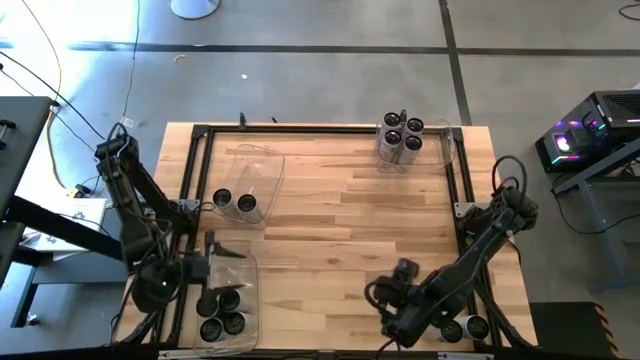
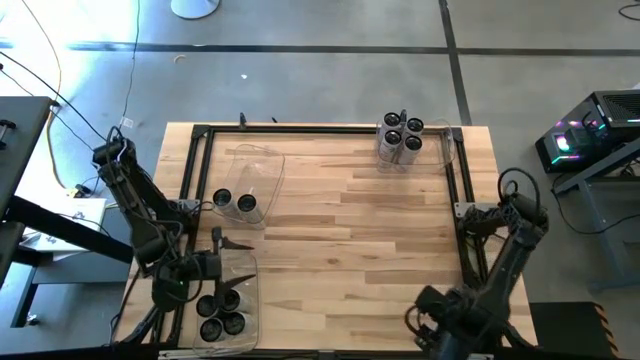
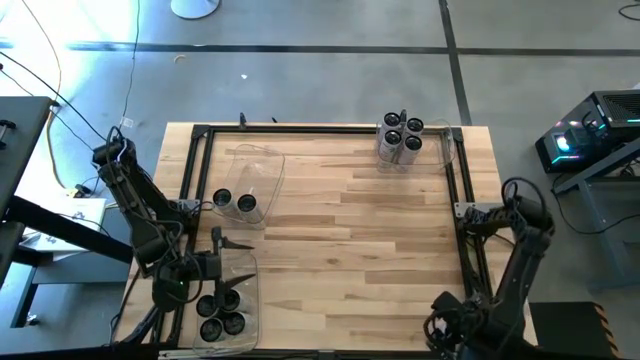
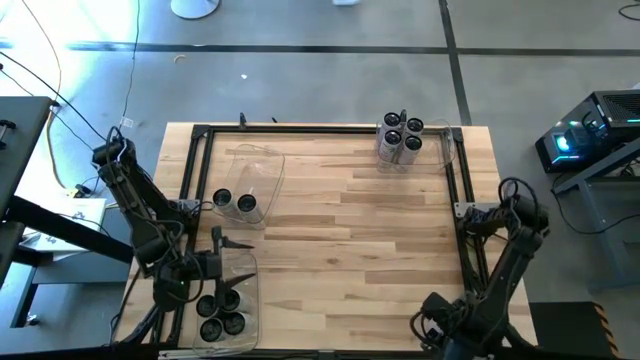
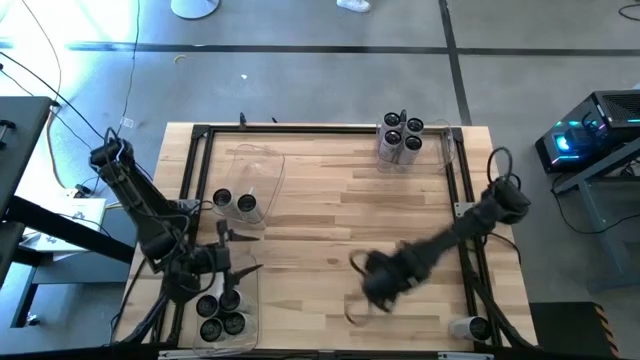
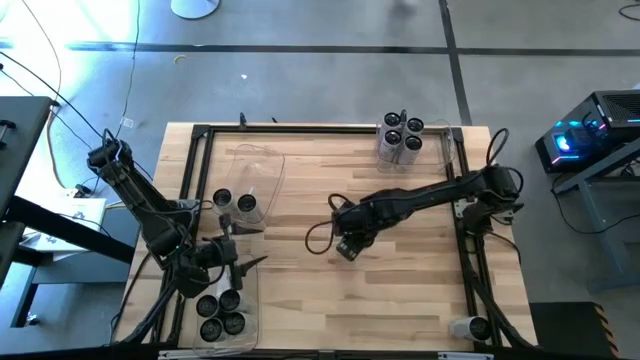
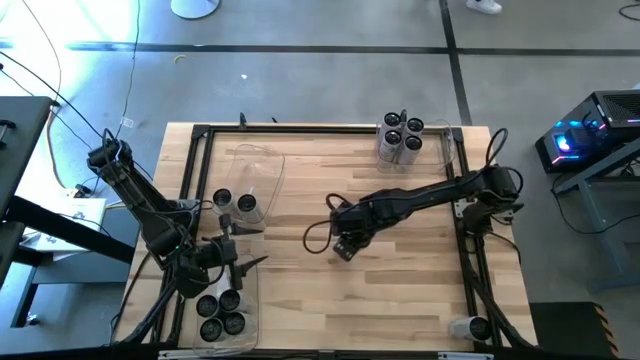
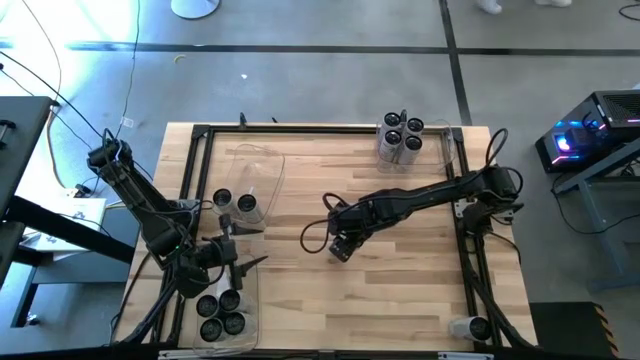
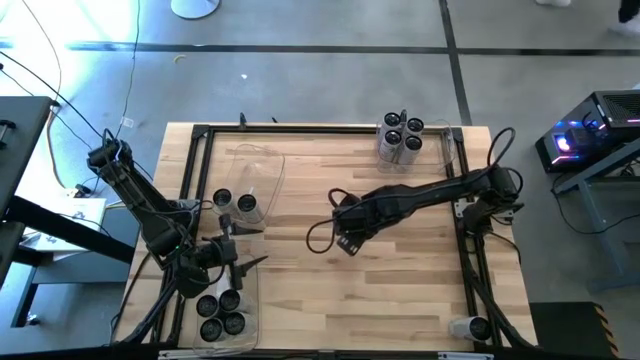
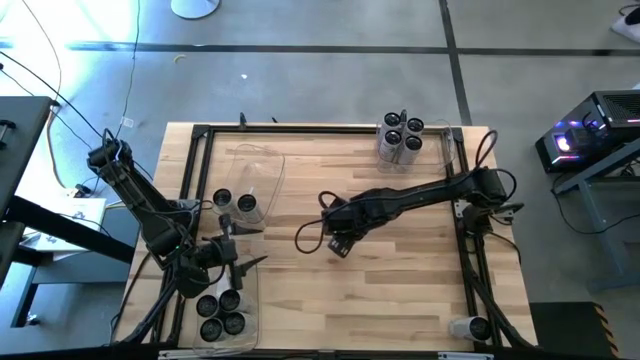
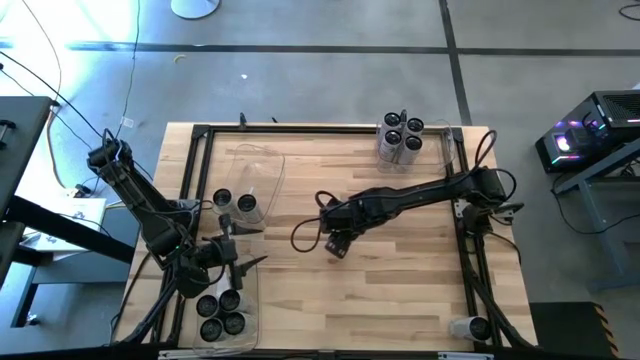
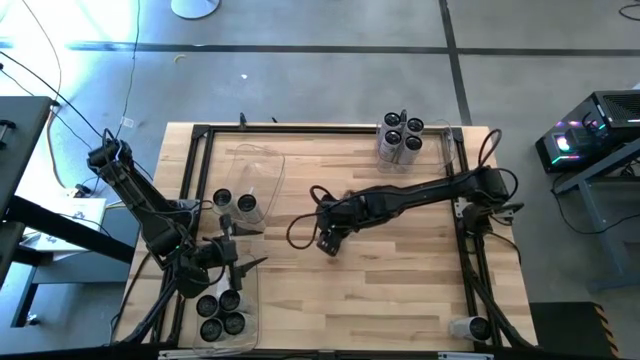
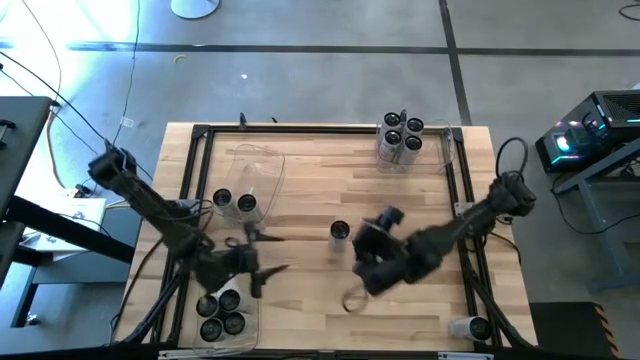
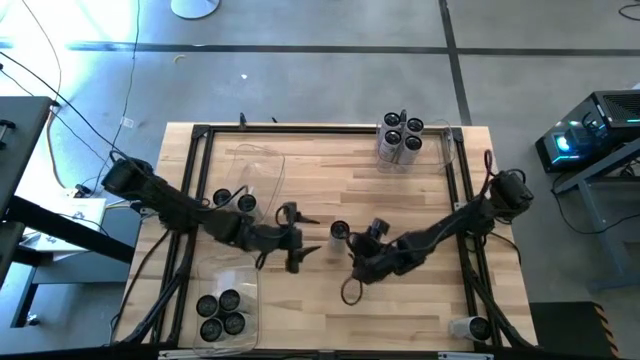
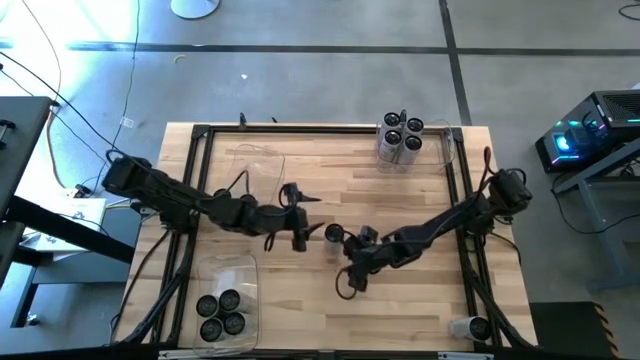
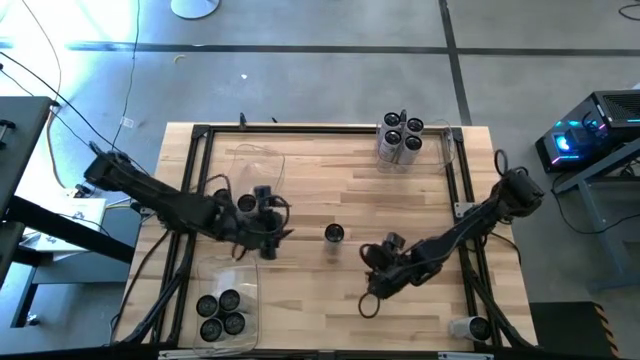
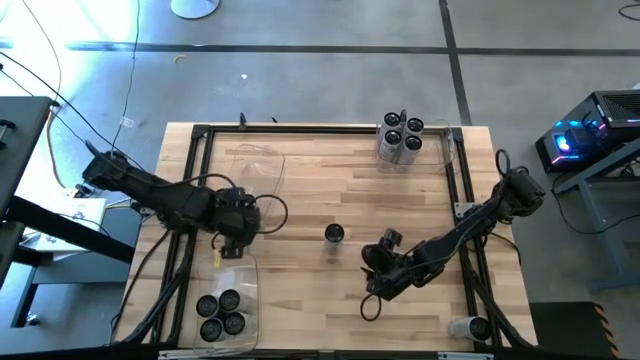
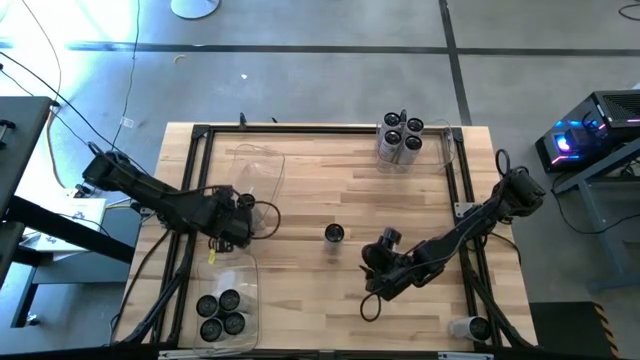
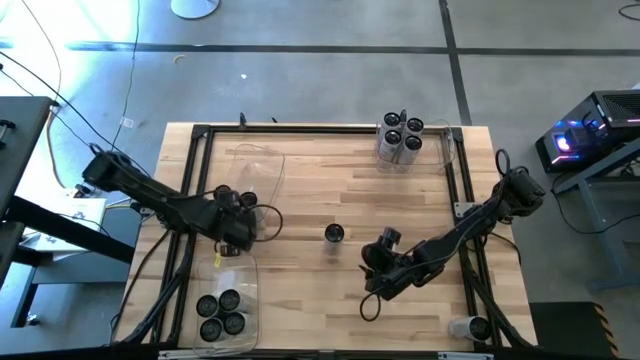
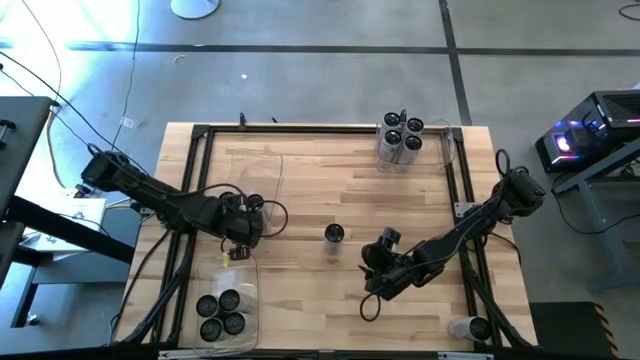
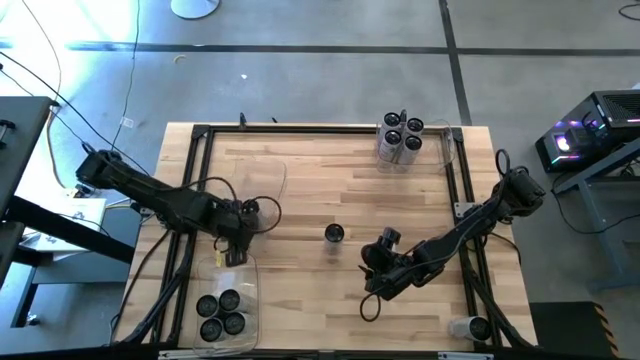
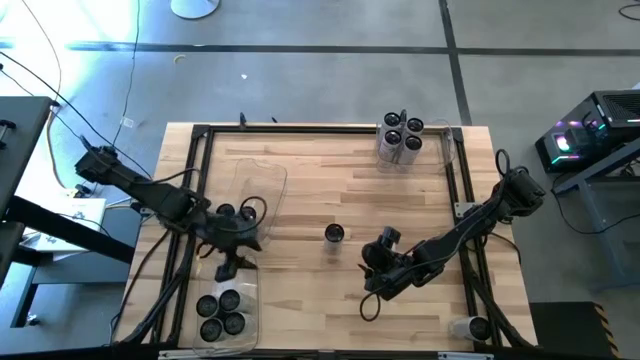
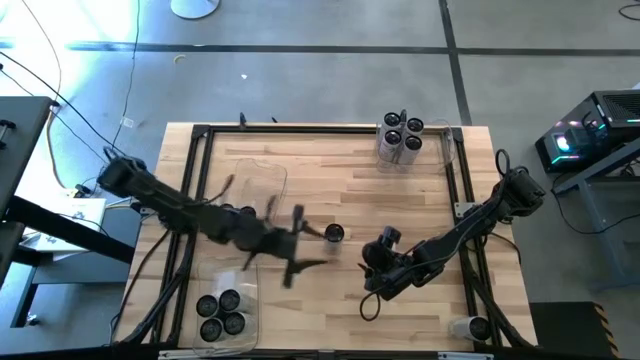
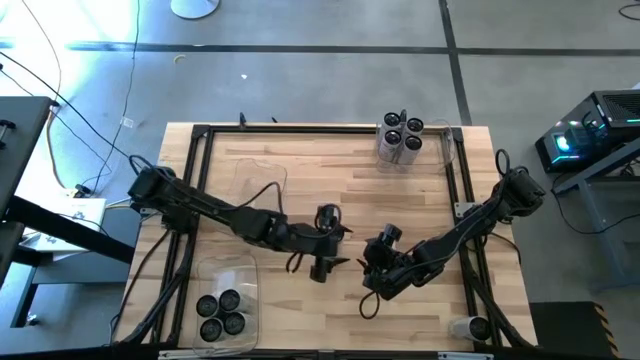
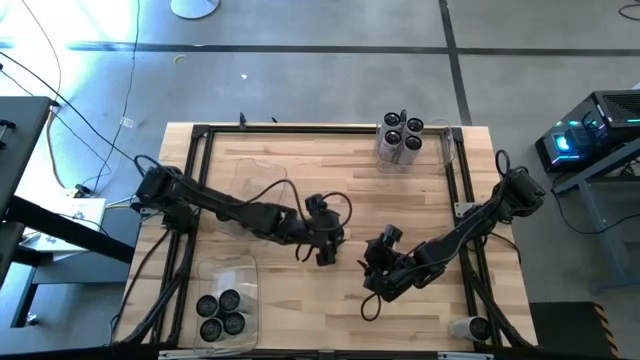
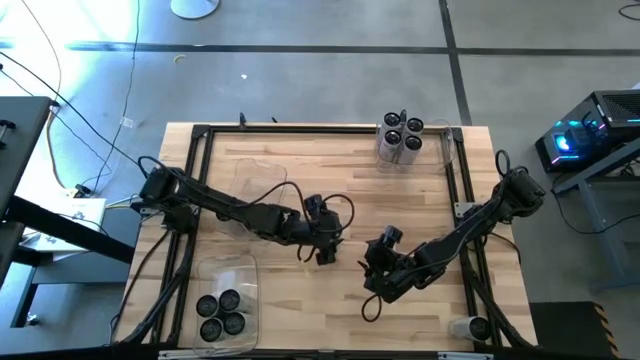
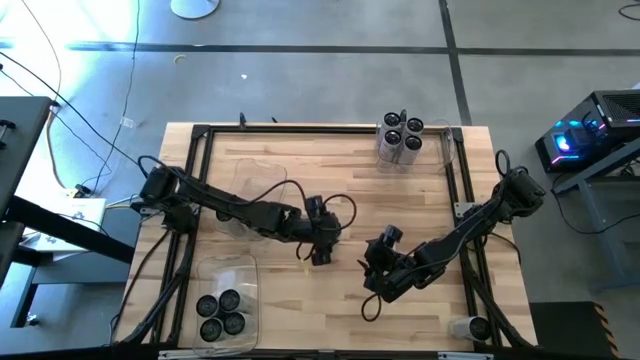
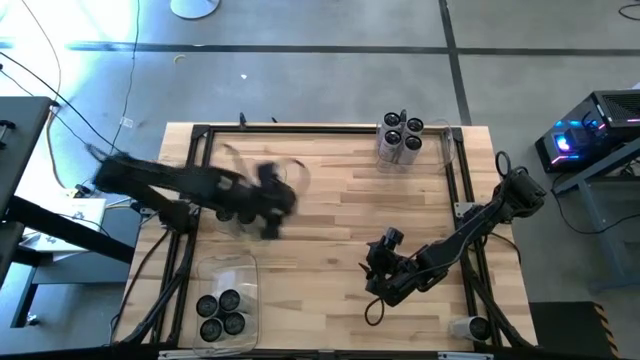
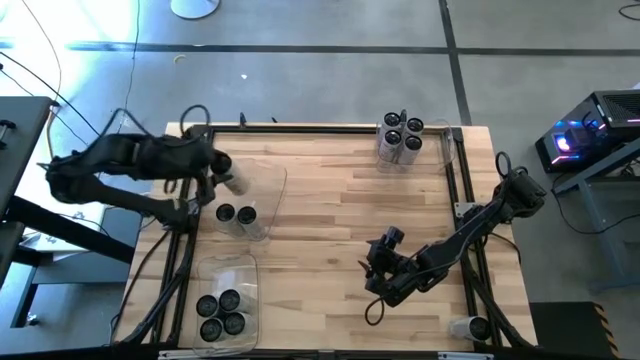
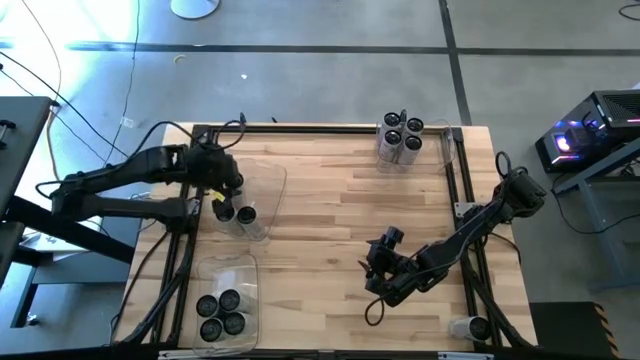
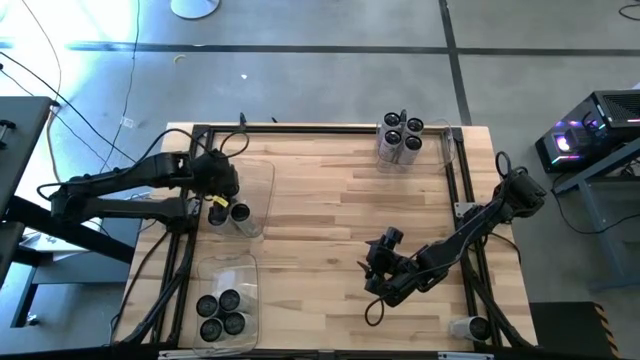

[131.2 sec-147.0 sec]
Task: Sort soda cans
Put the white yellow soda can into the top left transparent bin

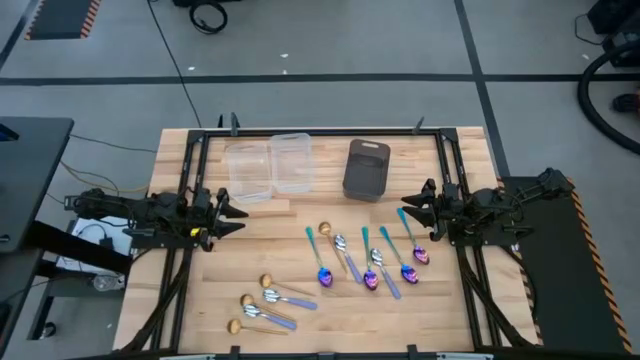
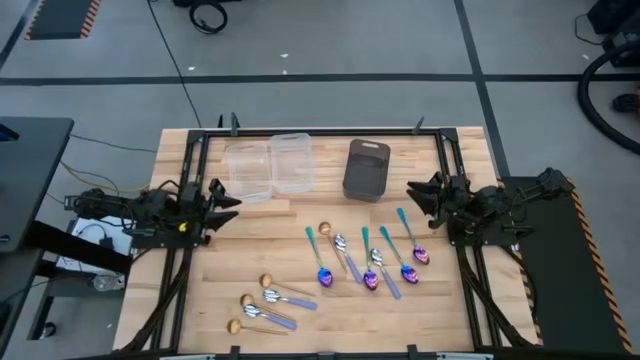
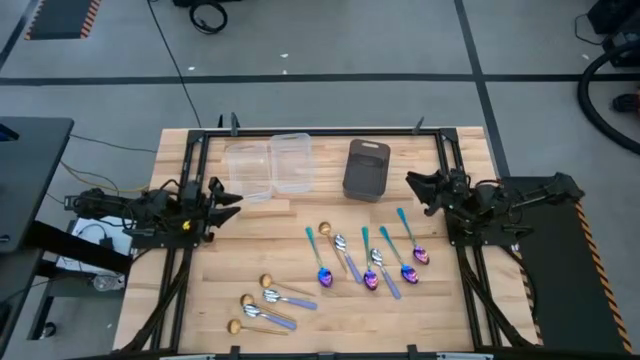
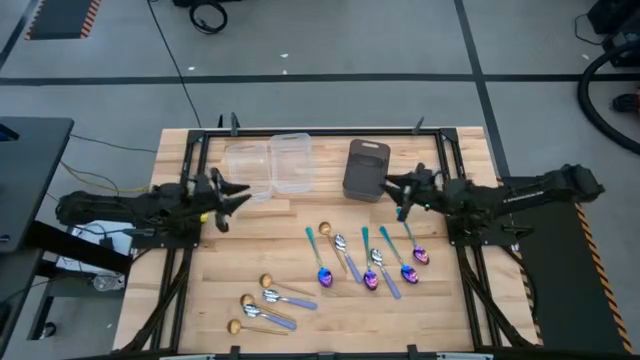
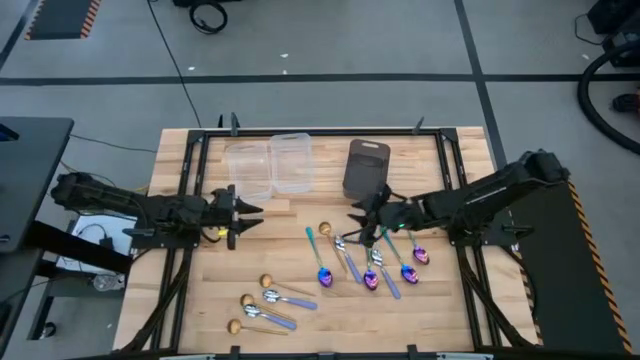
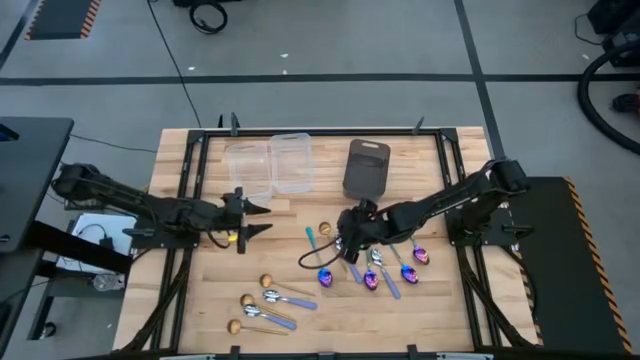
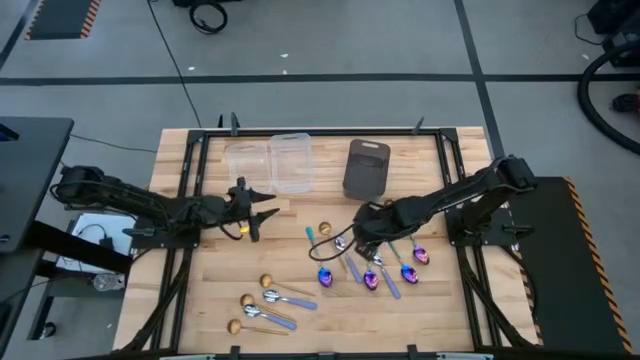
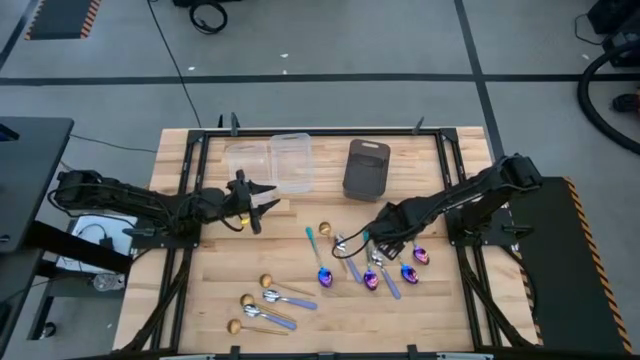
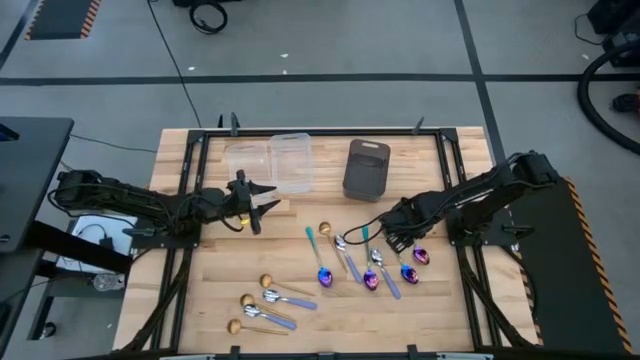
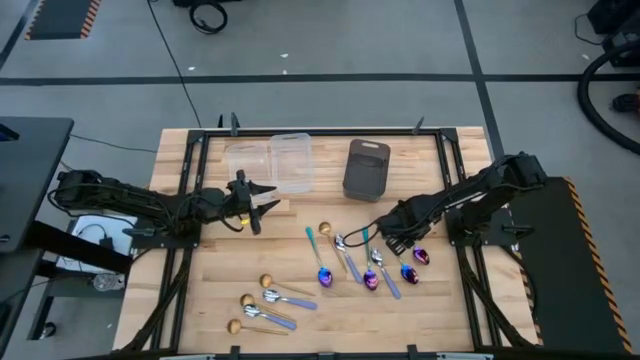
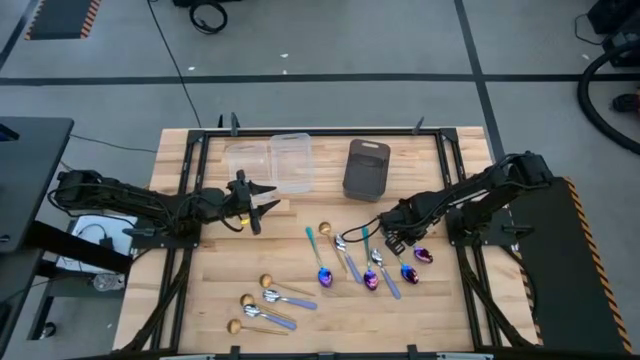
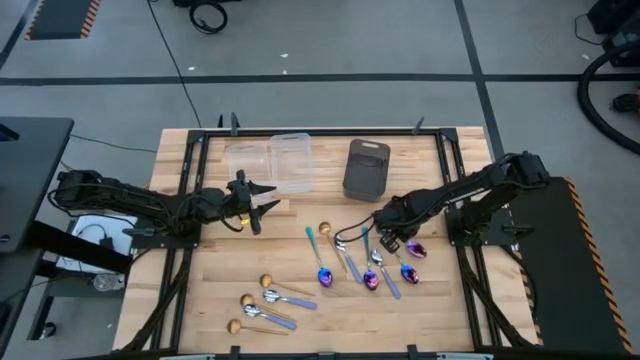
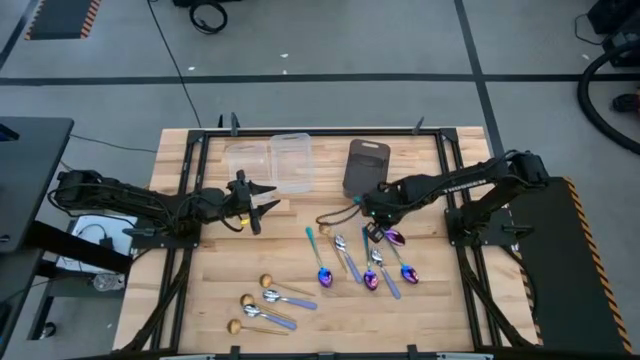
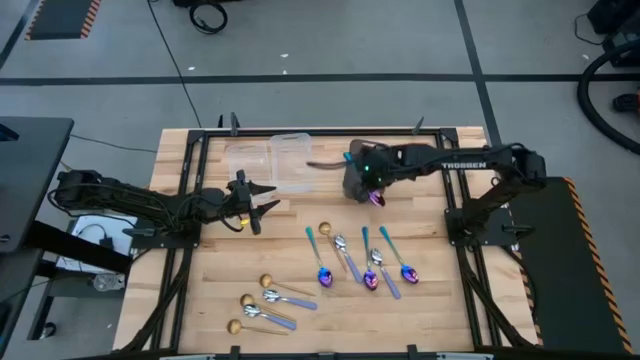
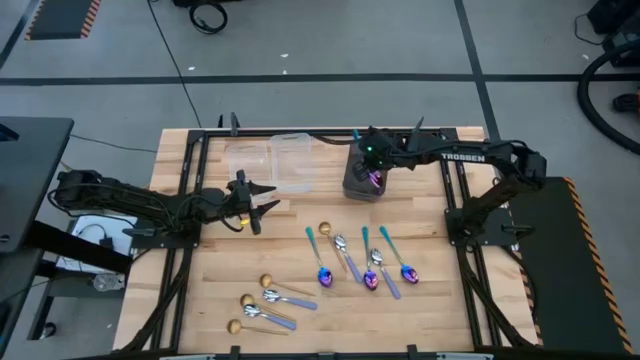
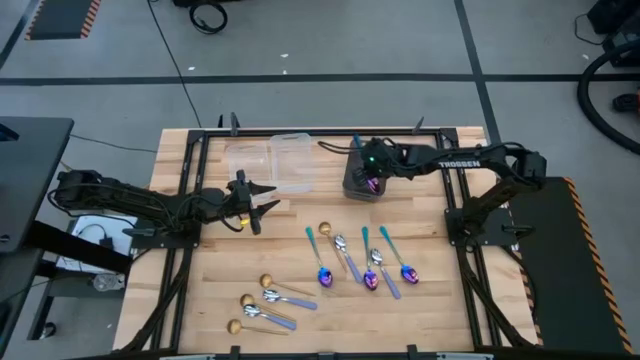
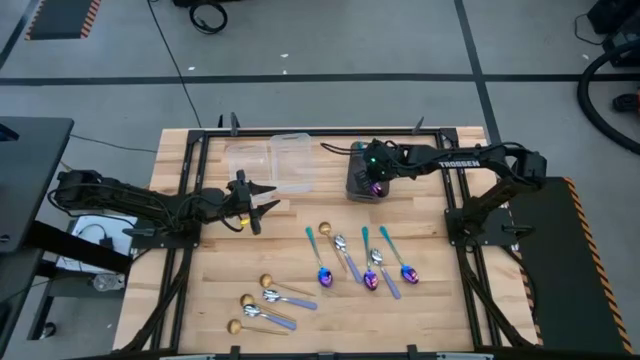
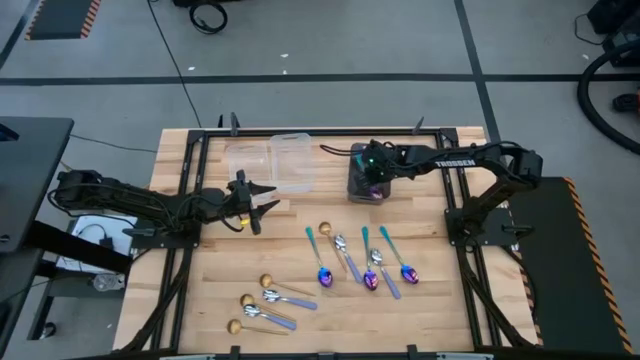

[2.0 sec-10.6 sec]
Task: Sort silverware by color (type)
Put the blue spoon into the black bin
